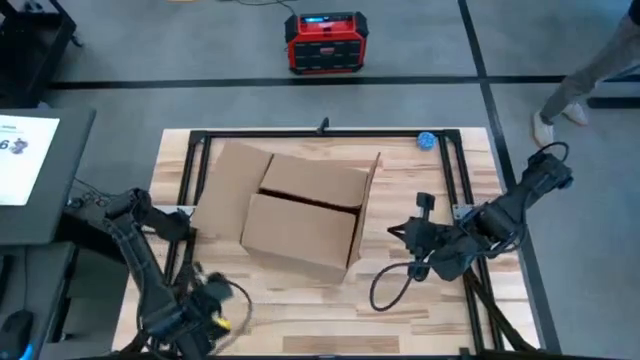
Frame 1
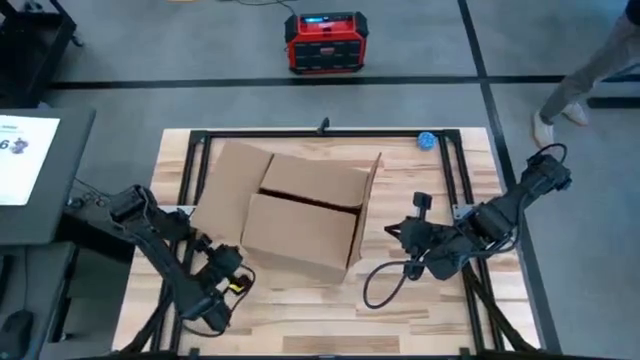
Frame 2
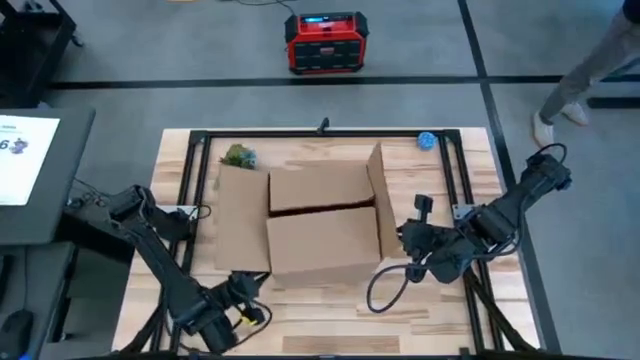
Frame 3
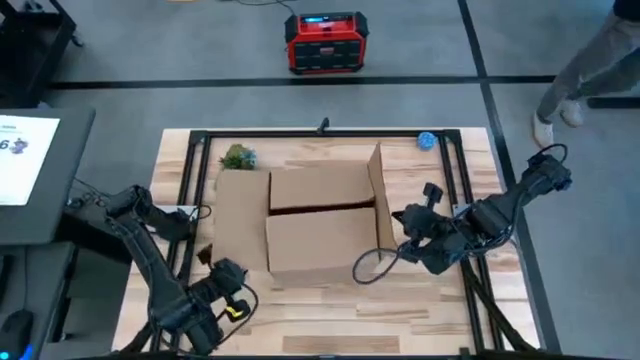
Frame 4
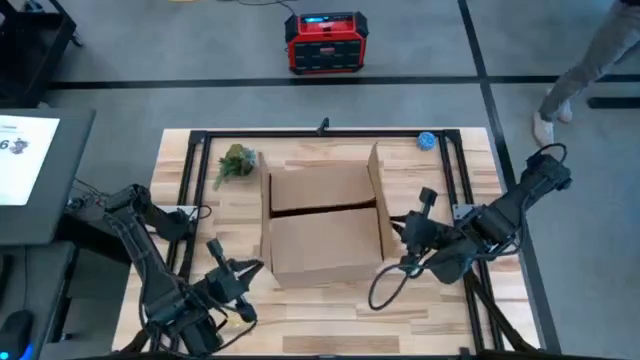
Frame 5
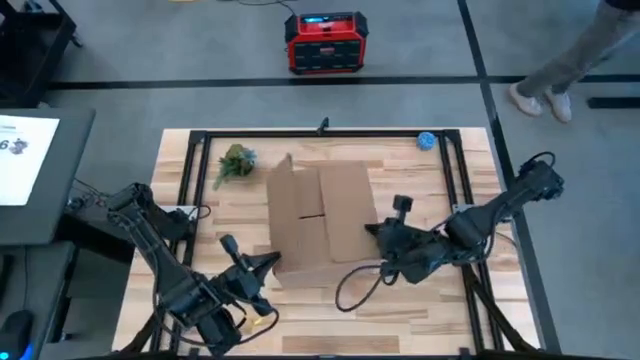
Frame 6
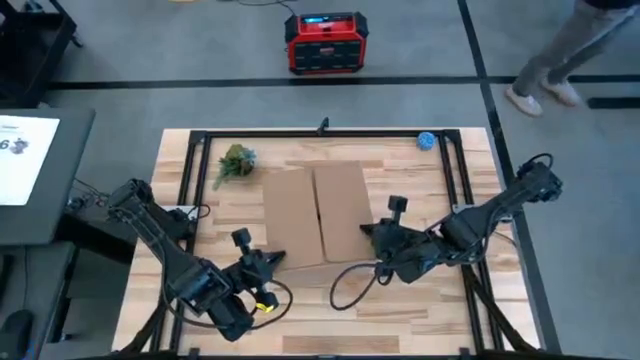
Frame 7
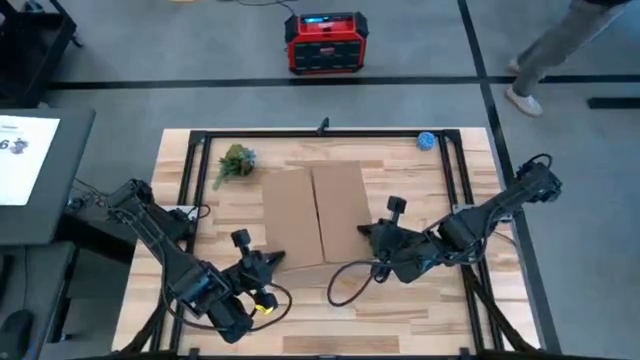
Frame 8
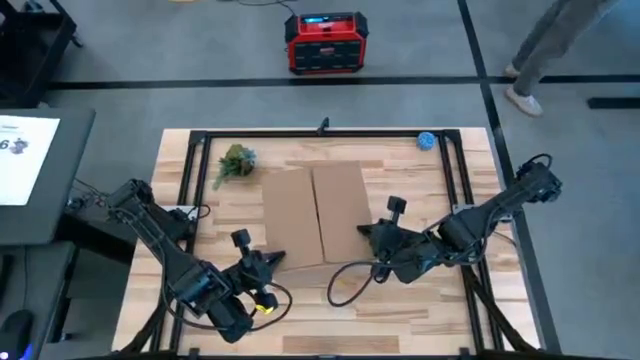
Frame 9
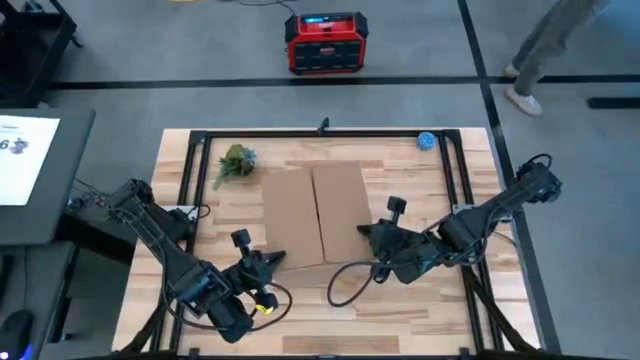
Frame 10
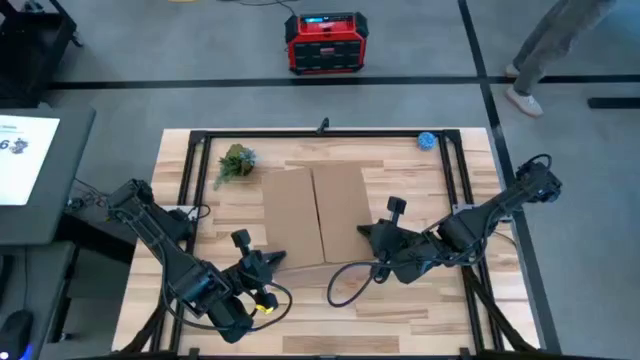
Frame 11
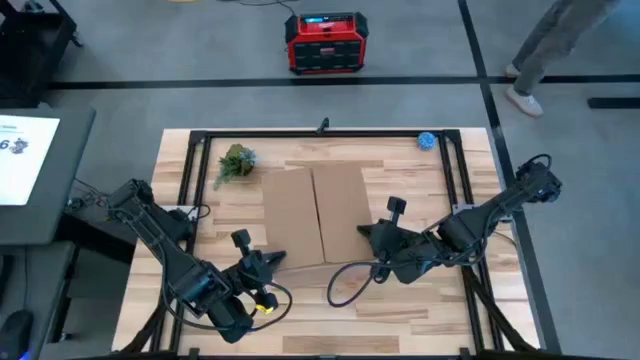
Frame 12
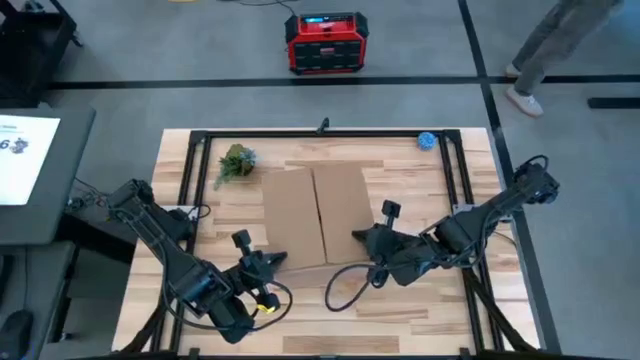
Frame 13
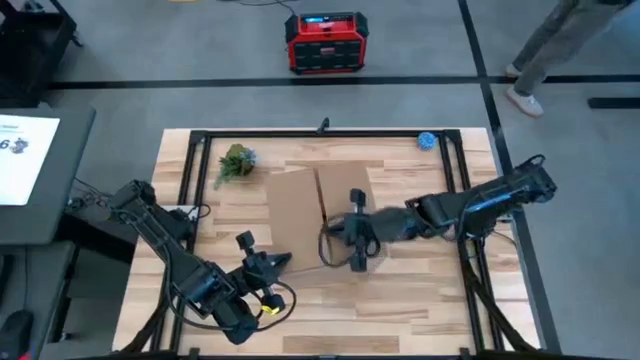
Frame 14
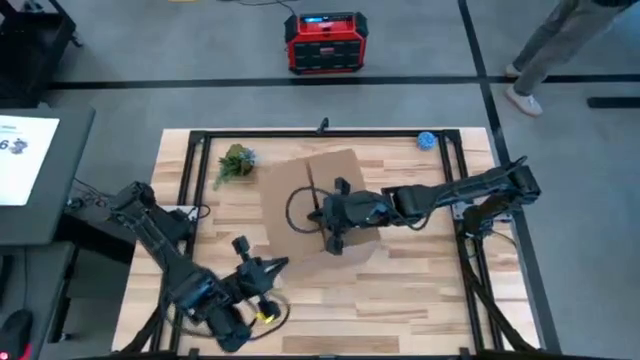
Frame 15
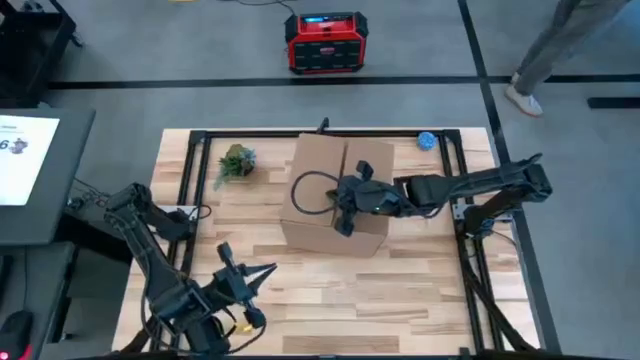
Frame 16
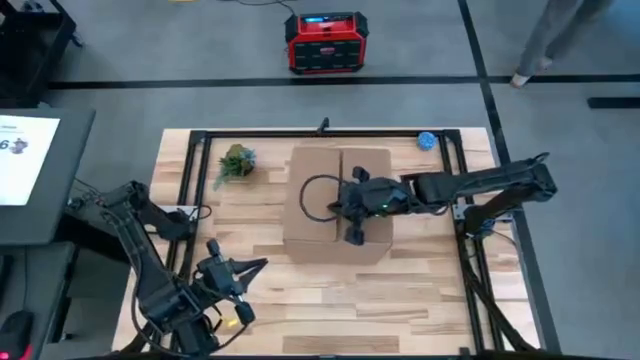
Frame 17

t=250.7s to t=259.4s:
Task: wrap mug
Close the brown cardboard box

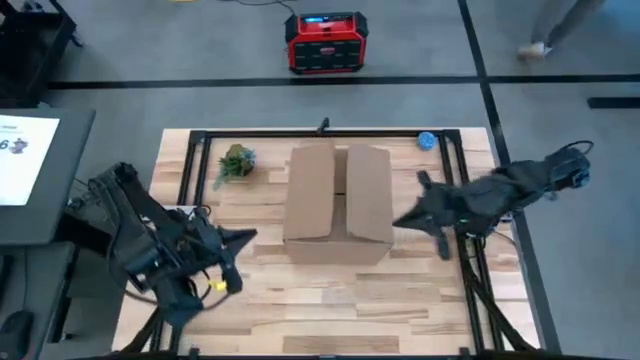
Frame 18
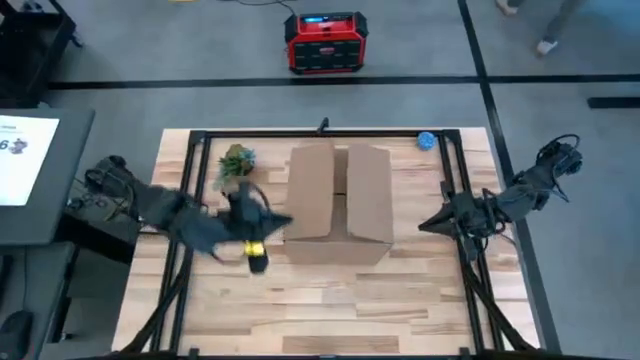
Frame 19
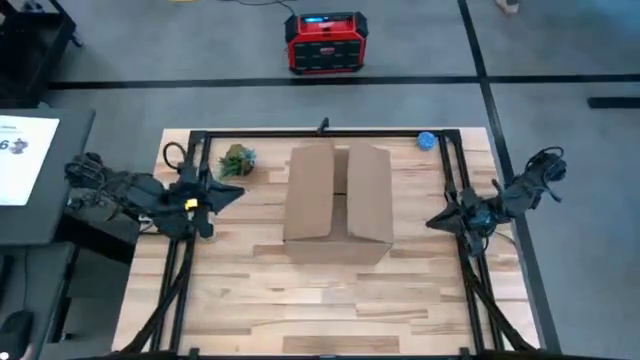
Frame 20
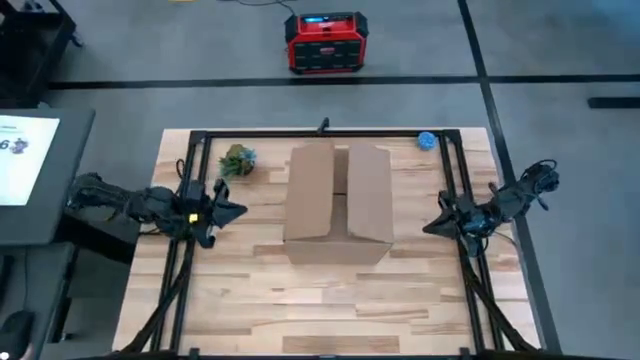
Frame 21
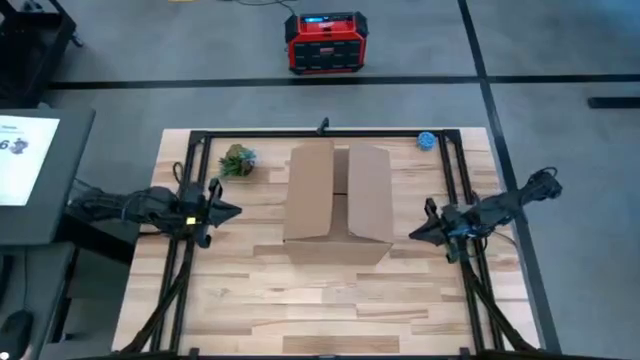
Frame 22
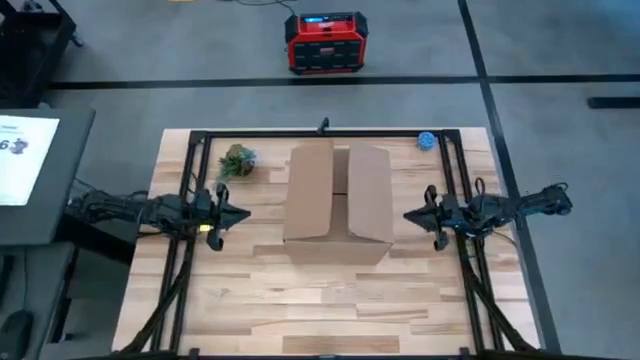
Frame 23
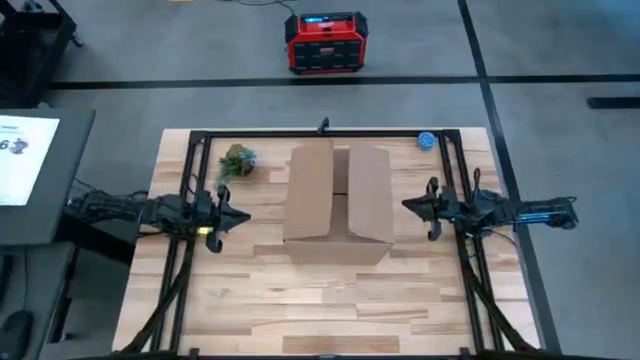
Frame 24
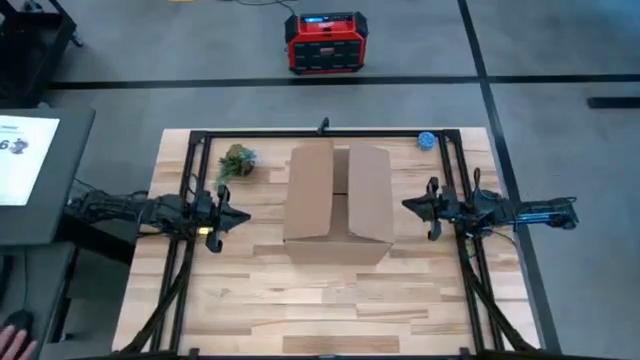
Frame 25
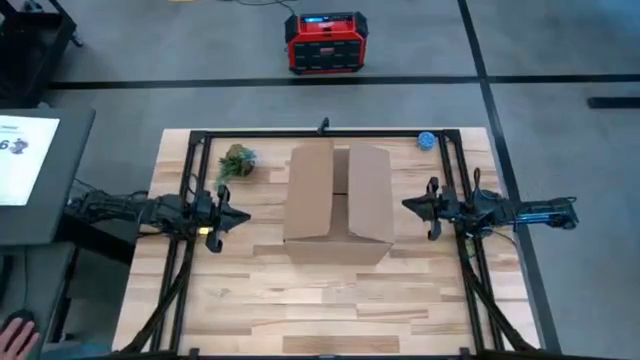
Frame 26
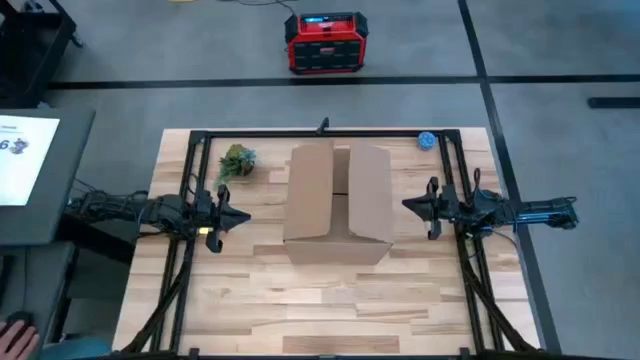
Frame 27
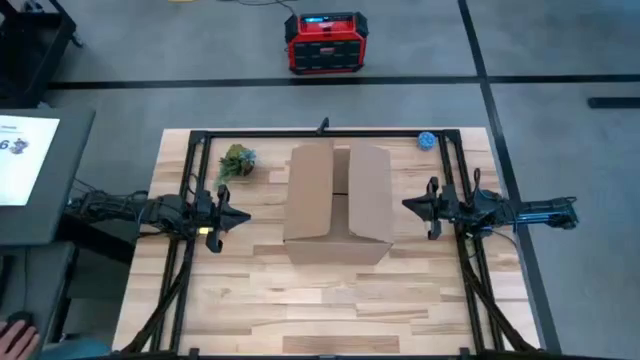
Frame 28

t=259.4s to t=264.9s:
Return to Home Position

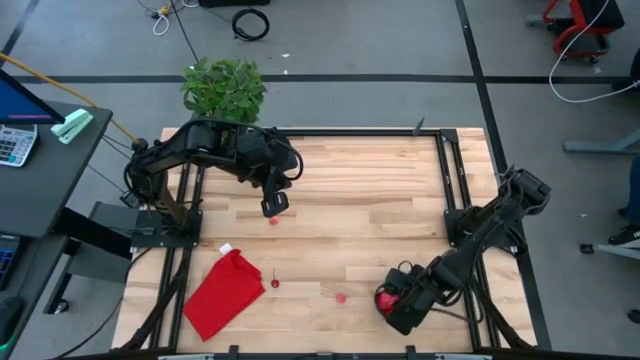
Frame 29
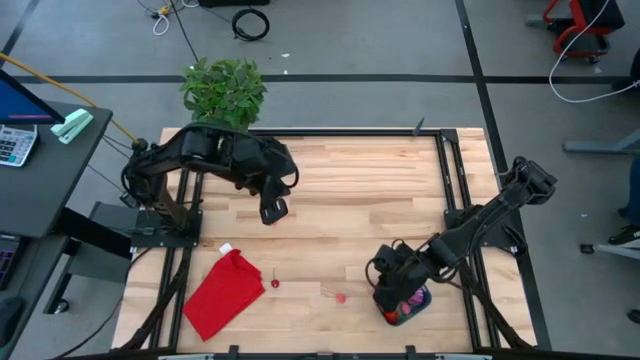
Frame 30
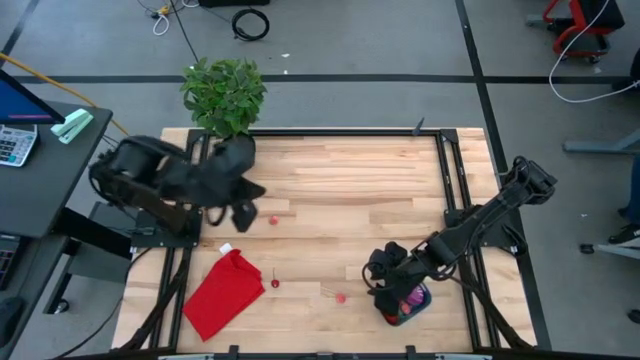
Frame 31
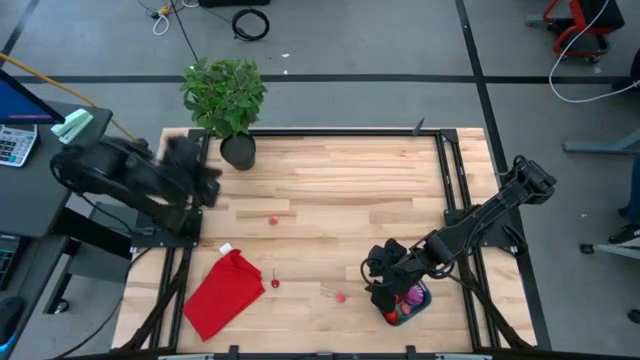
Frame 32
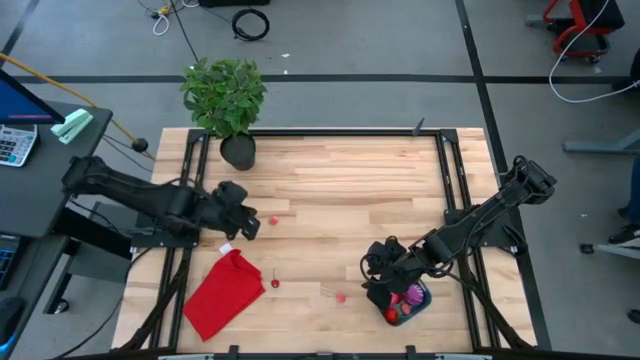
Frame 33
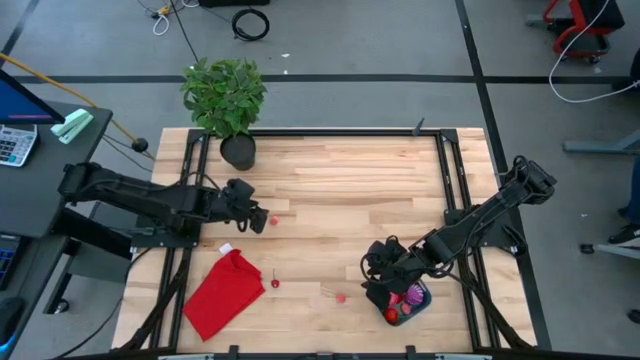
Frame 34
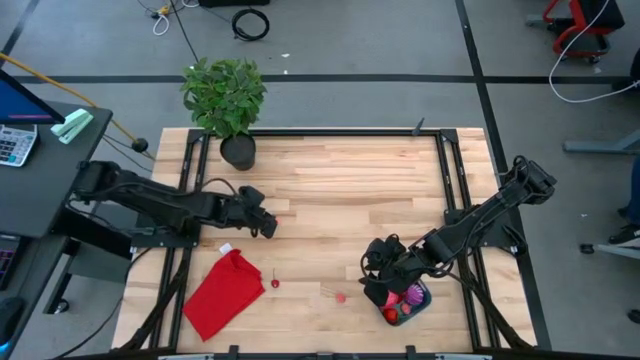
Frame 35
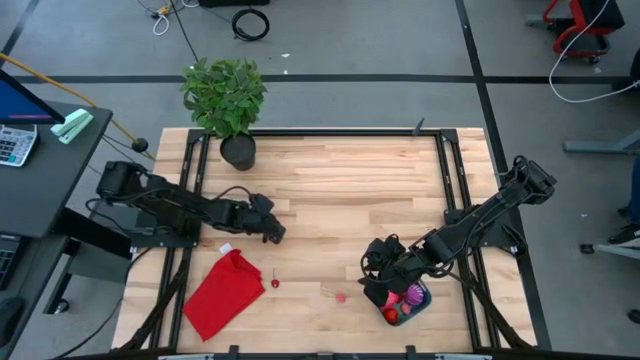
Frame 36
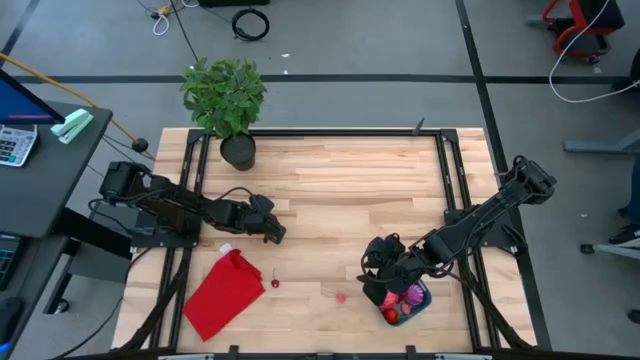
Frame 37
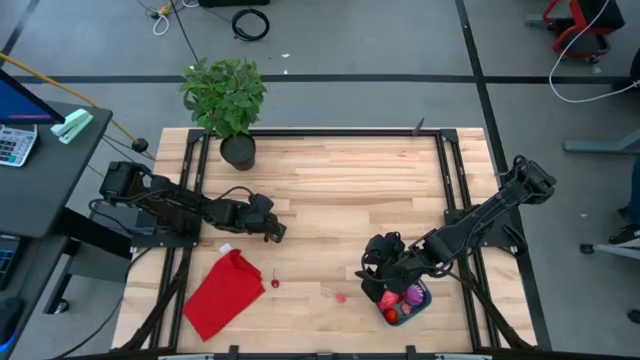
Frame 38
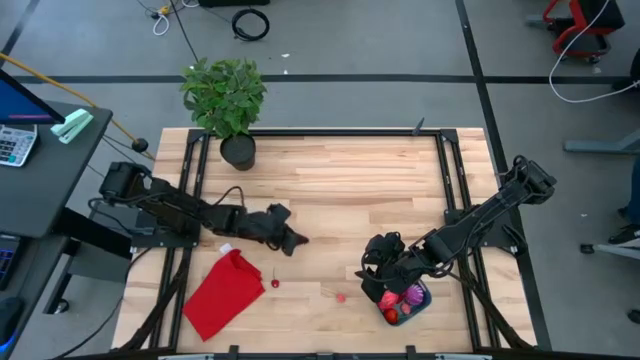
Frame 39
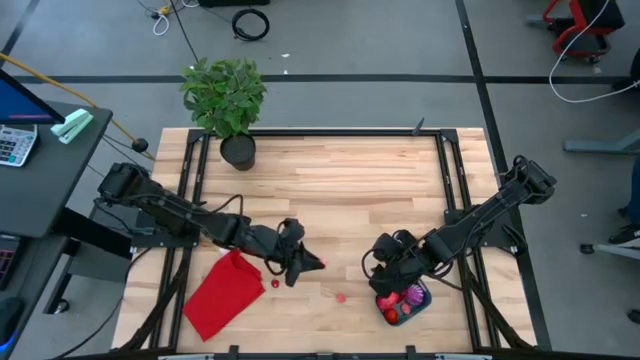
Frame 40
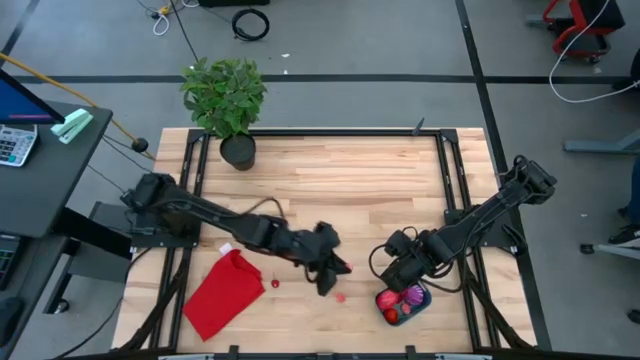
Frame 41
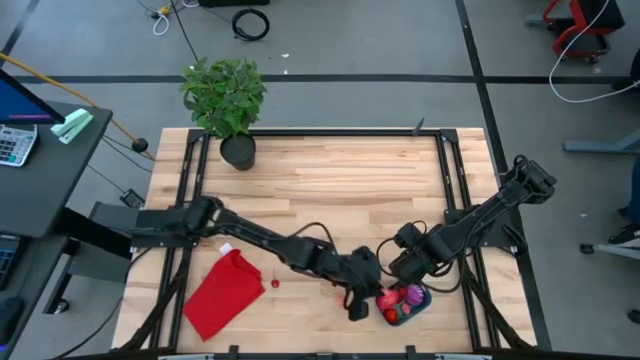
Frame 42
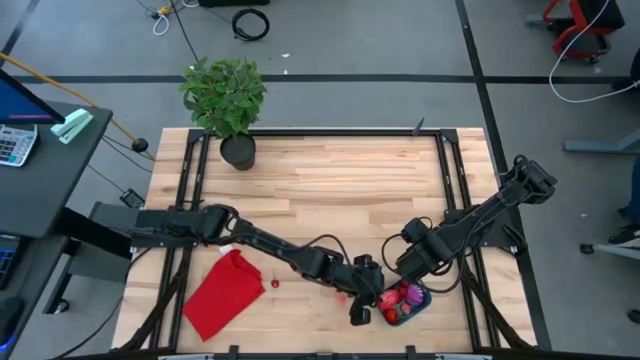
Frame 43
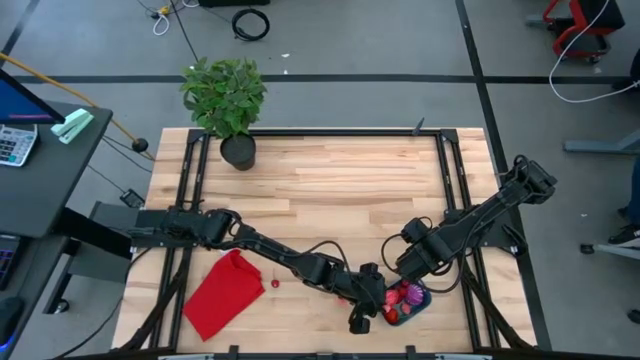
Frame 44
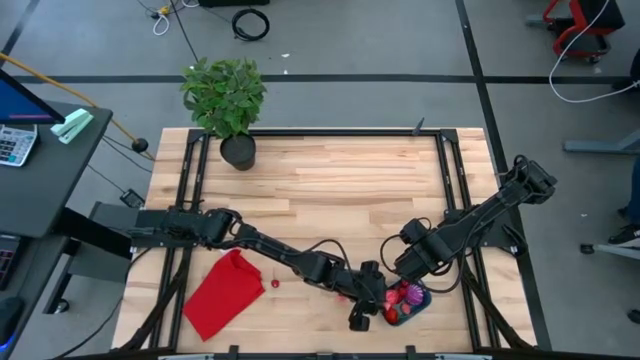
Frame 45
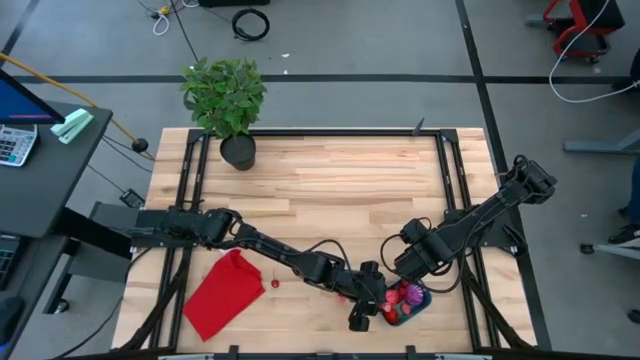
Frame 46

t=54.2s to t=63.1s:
Task: Pick and placing Produce into tupperware
Put the top peach into the bin
